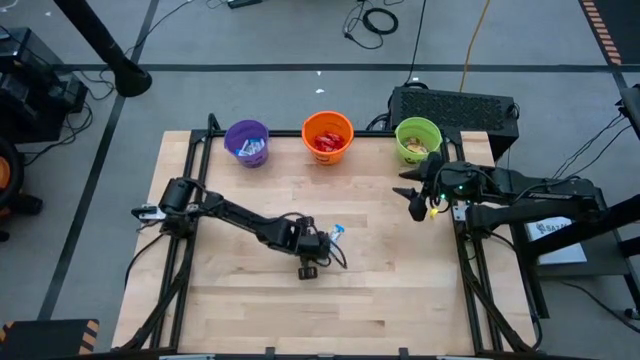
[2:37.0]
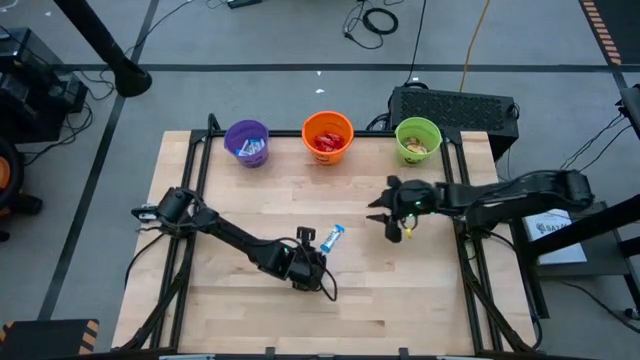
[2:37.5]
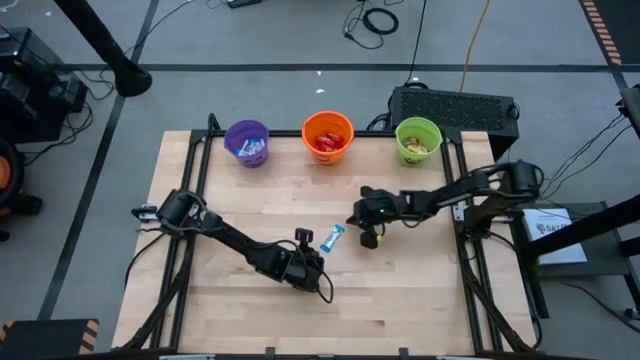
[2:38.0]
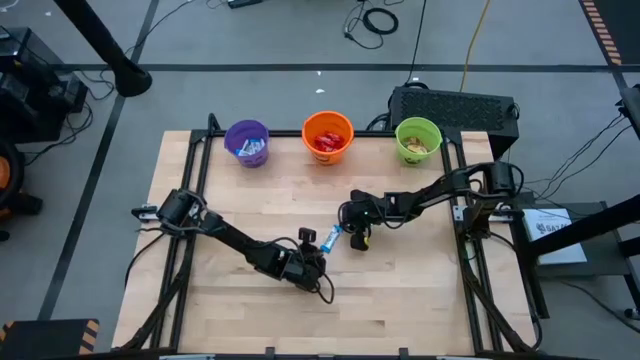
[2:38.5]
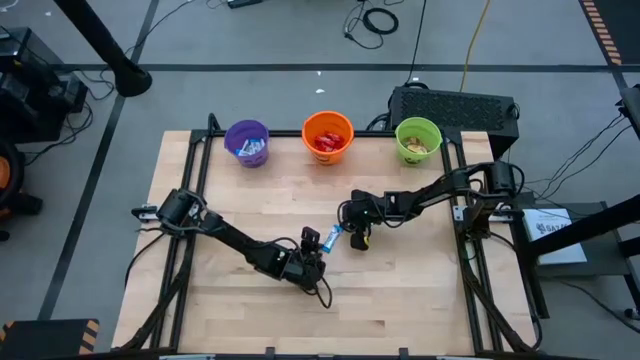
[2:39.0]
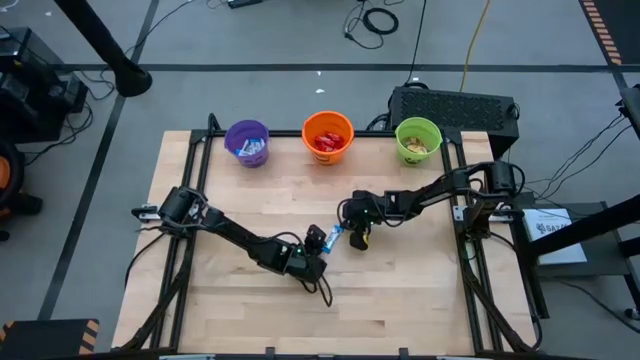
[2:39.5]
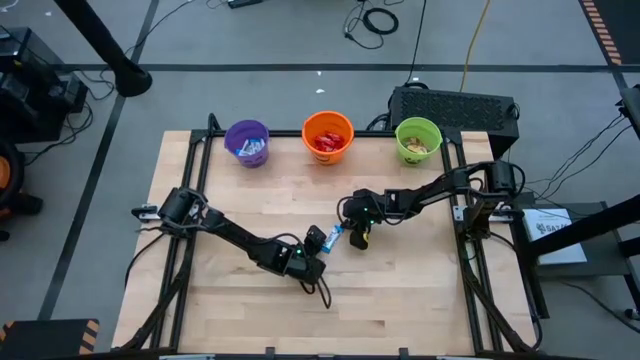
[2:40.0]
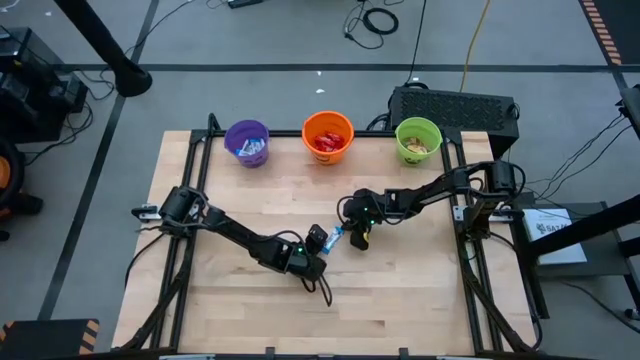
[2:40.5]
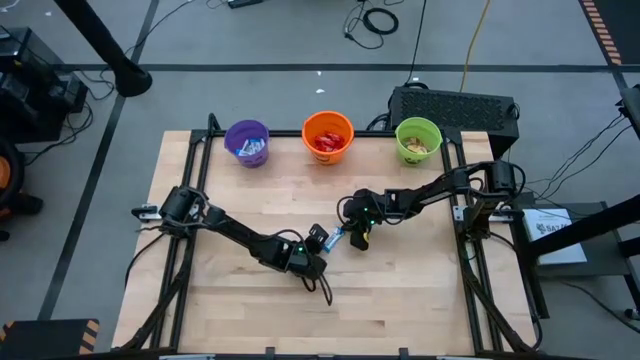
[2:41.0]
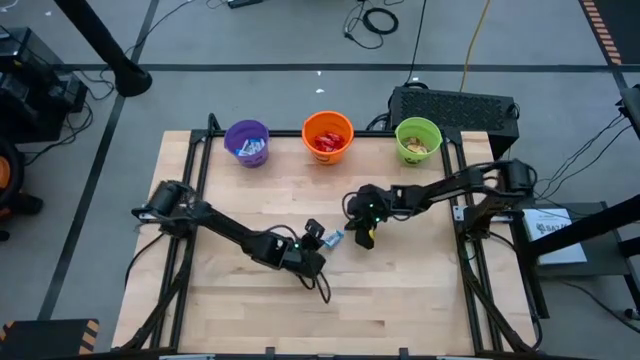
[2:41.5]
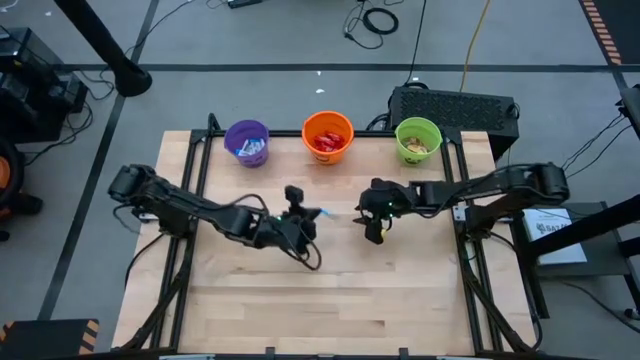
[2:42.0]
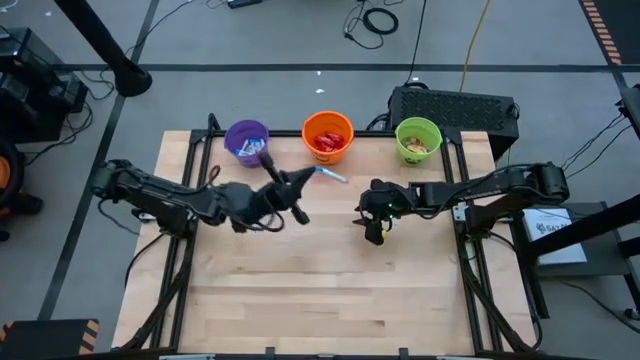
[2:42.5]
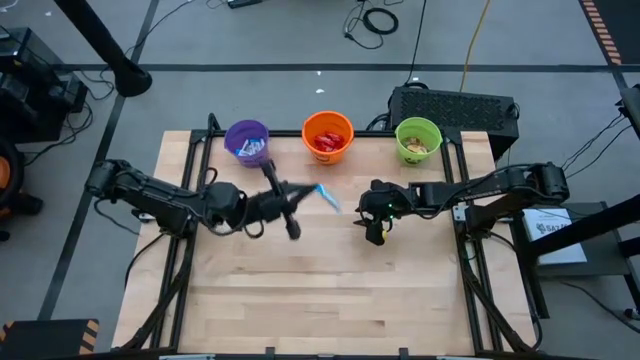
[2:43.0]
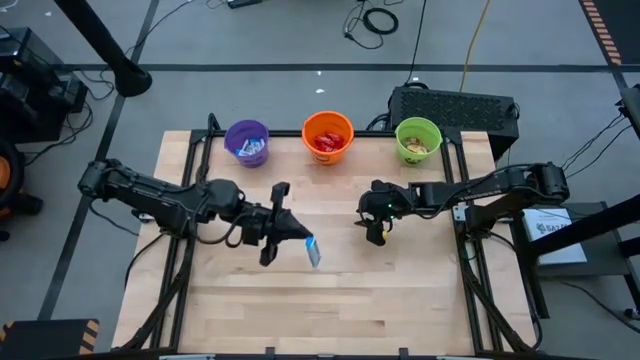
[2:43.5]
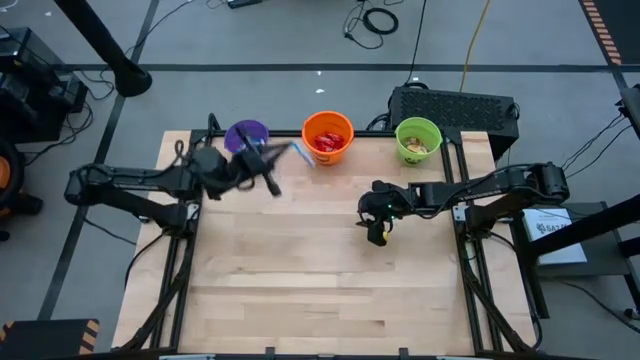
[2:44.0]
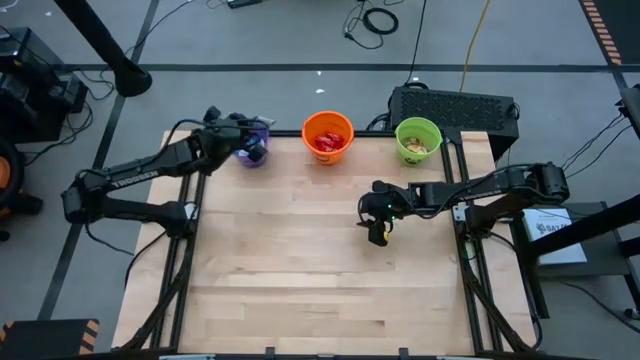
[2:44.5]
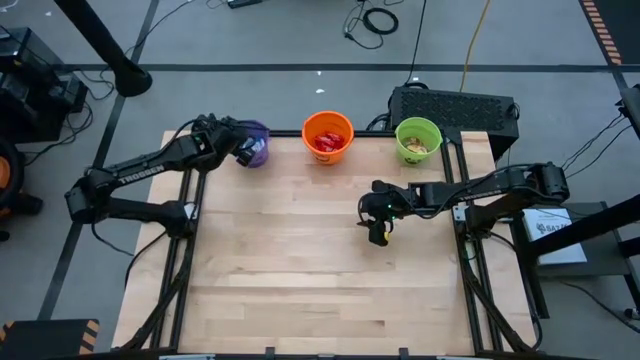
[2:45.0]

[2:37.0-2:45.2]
Task: Sort candy by brand, put in halloween buckets
Put the white chocolate into the purple bucket

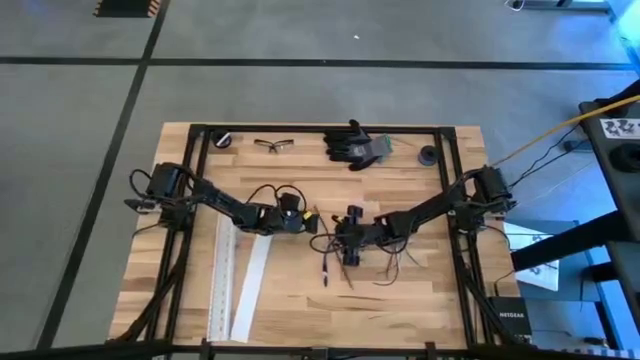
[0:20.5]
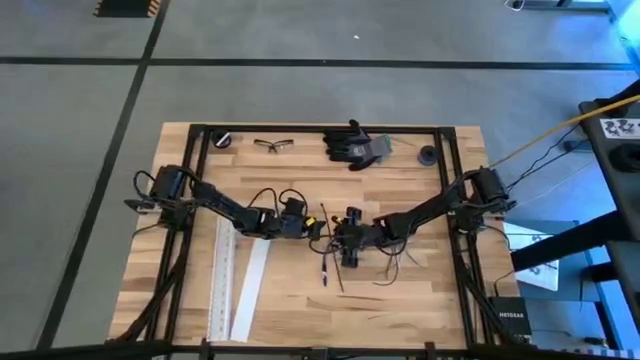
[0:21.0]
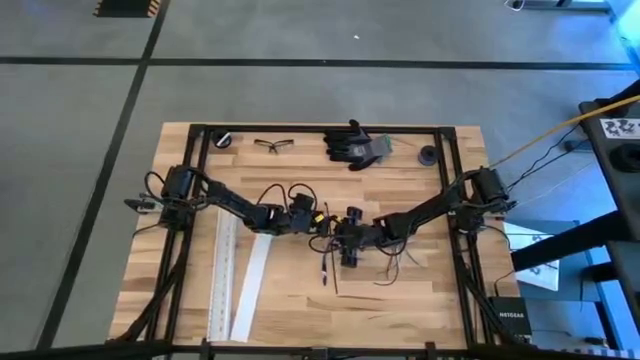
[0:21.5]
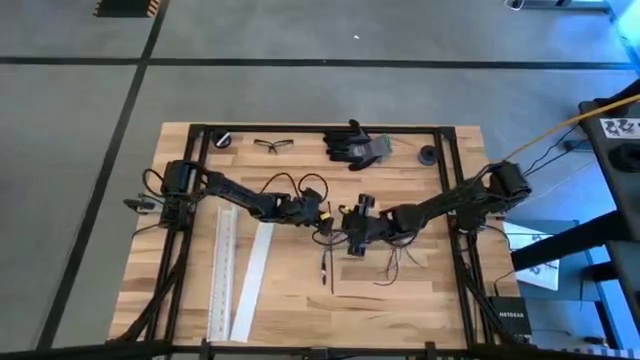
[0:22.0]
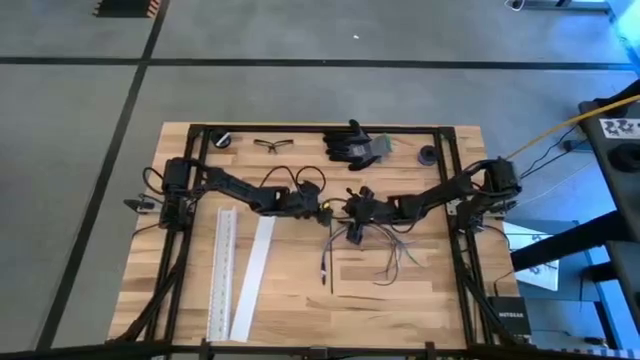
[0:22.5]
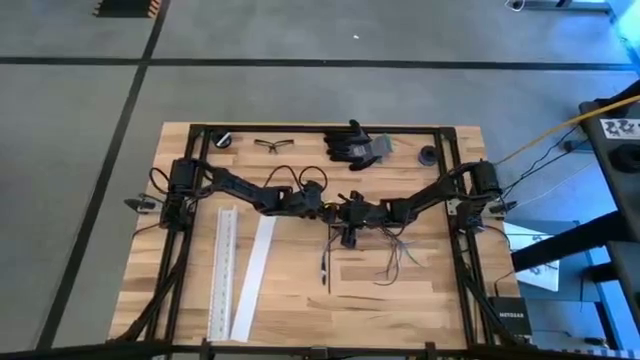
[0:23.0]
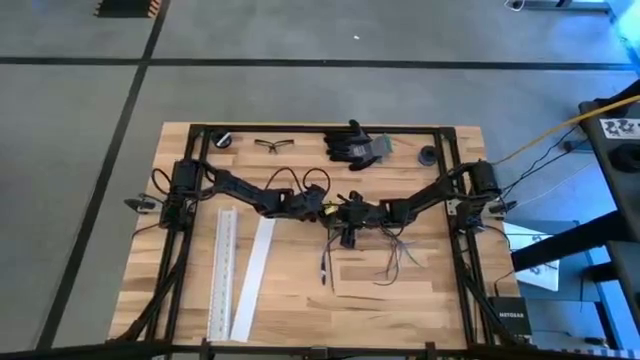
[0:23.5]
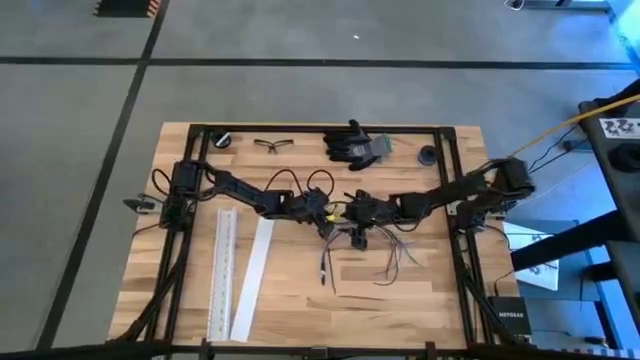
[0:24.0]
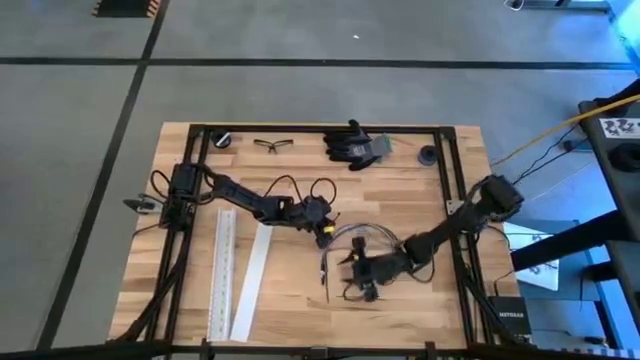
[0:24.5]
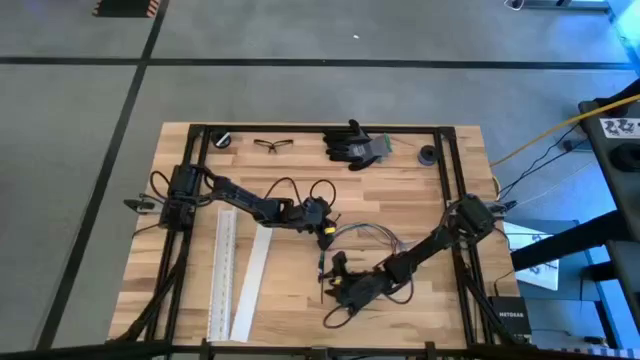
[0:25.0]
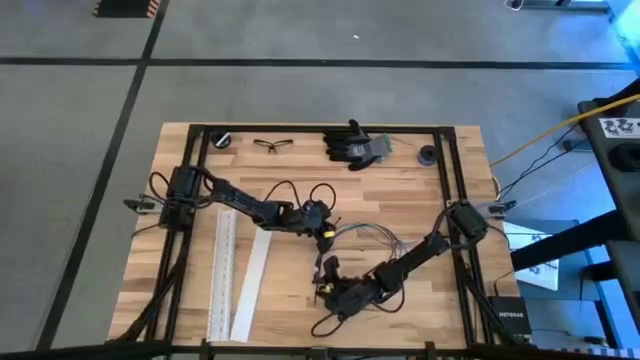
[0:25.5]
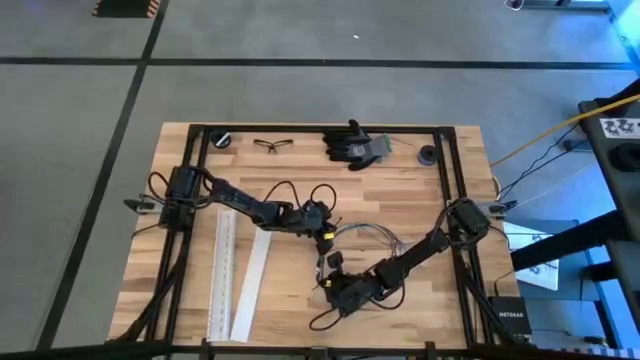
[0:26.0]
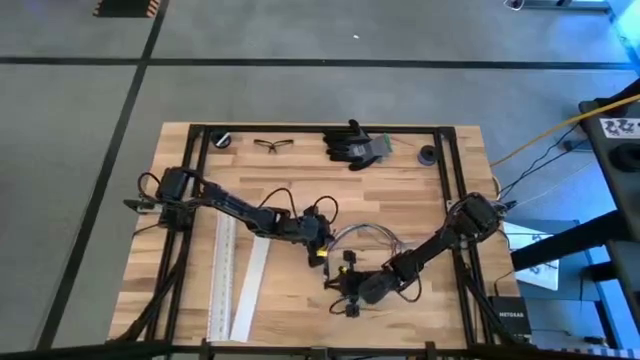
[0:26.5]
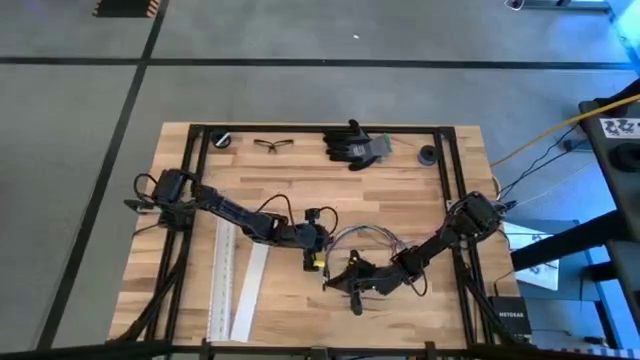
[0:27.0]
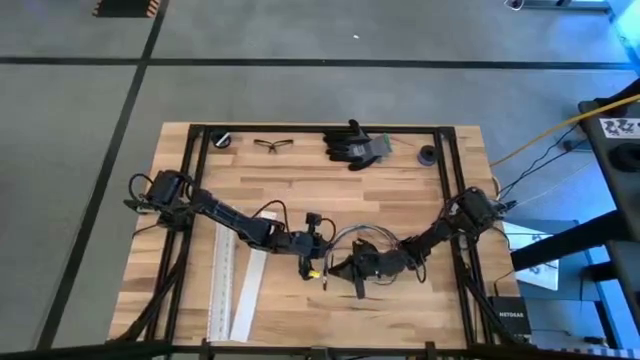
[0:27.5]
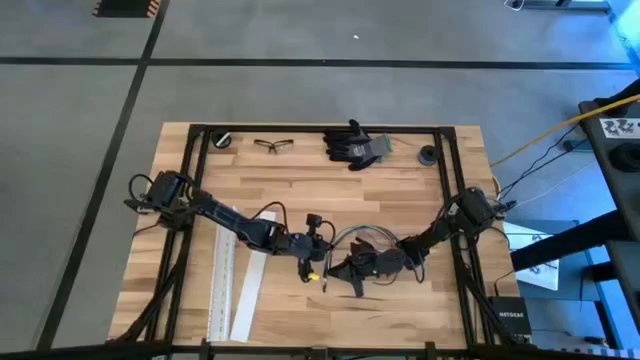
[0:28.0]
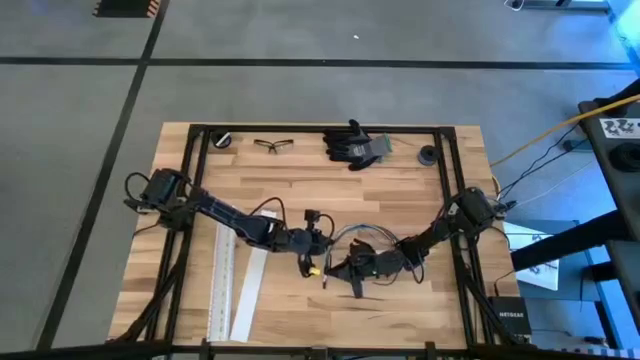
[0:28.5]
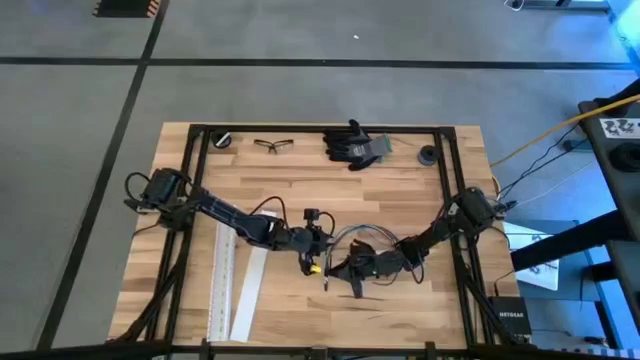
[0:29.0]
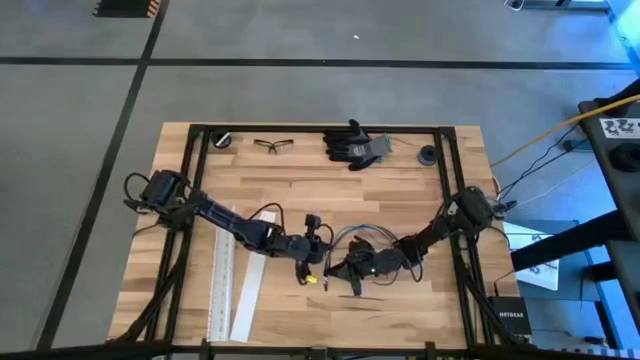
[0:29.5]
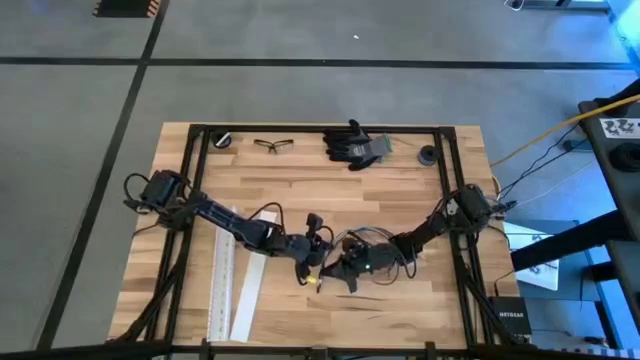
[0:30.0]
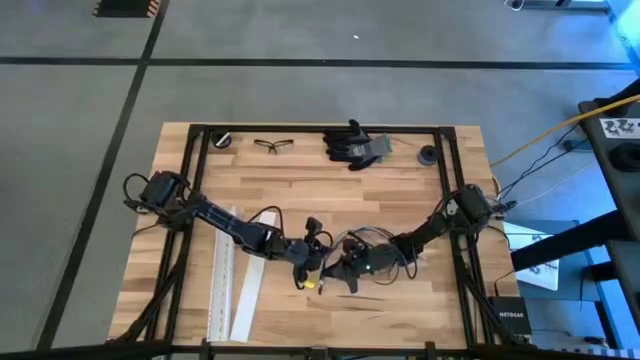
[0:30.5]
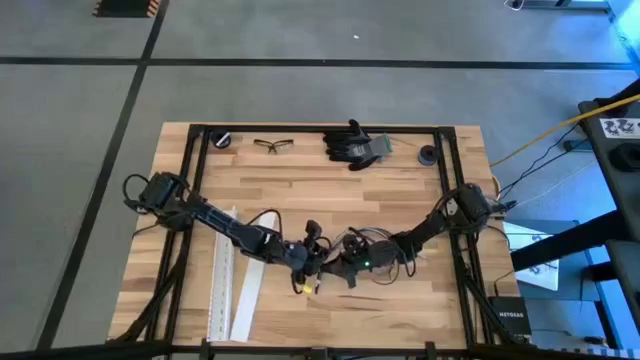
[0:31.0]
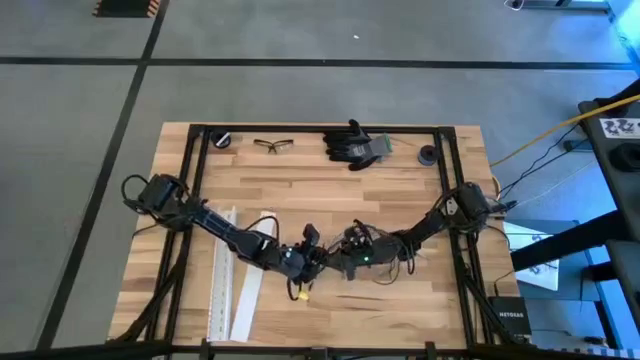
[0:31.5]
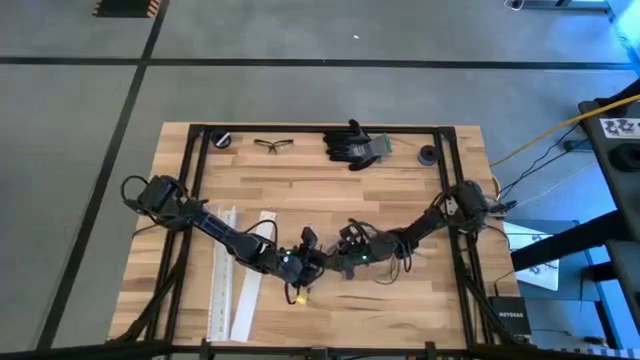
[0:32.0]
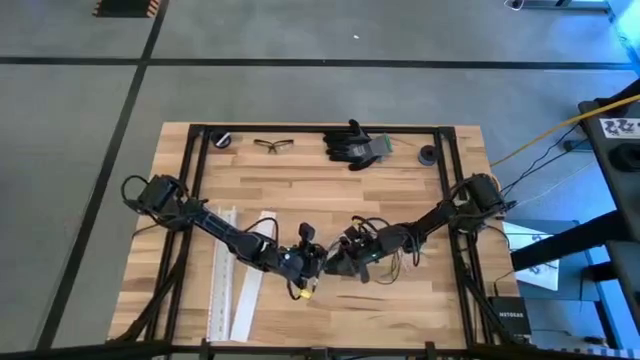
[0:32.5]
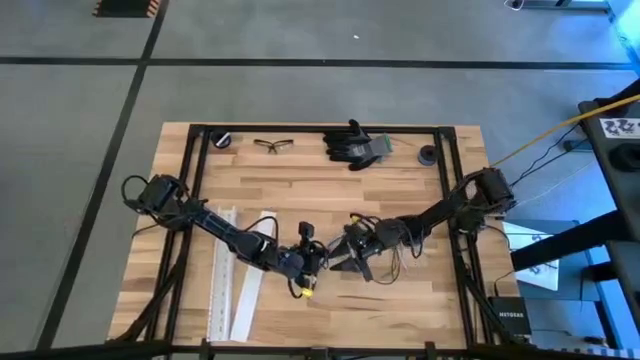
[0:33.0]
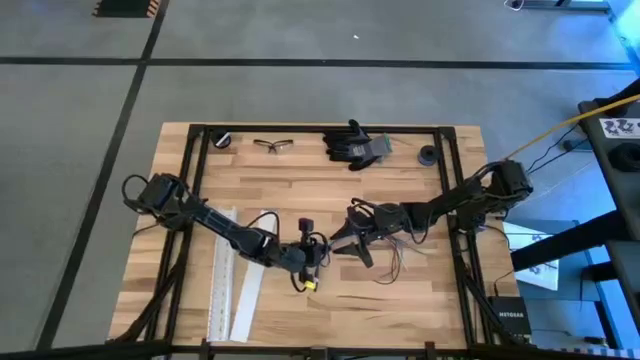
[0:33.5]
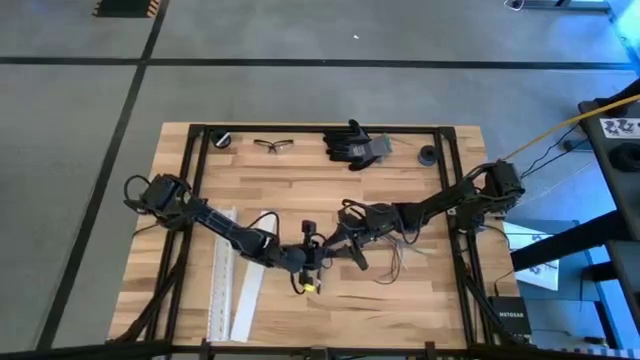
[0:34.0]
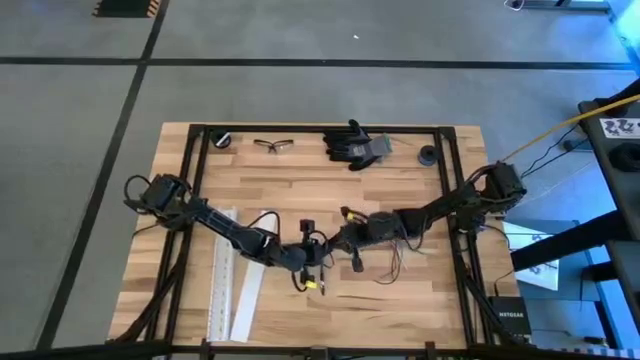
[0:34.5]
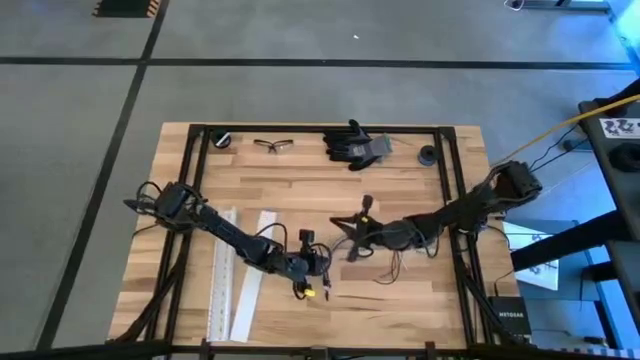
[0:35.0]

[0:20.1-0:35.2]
Task: Ziptie cables
Wrap the black zip tie around the cable wires to form a loop
